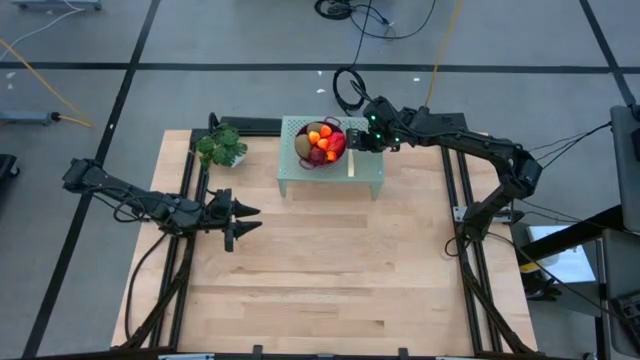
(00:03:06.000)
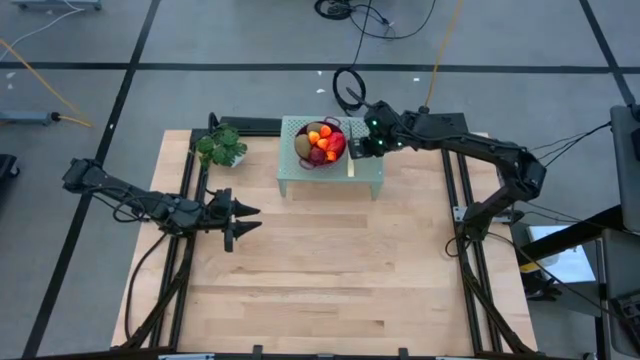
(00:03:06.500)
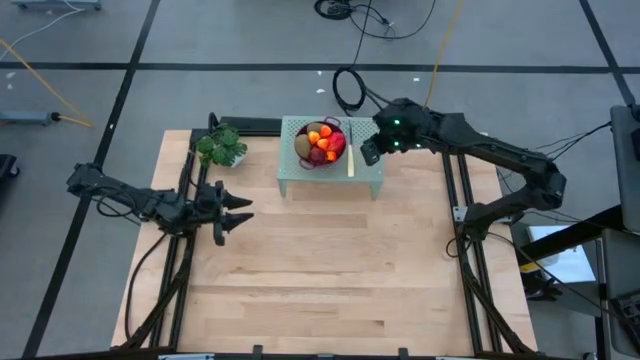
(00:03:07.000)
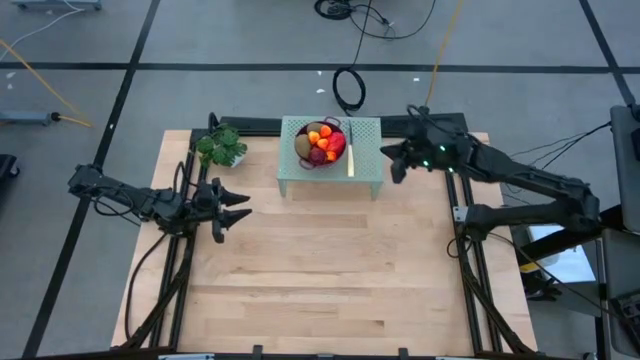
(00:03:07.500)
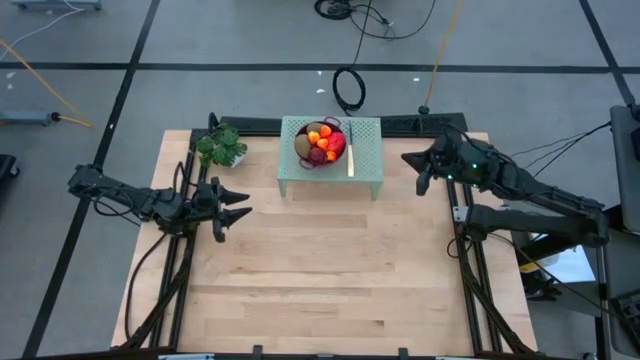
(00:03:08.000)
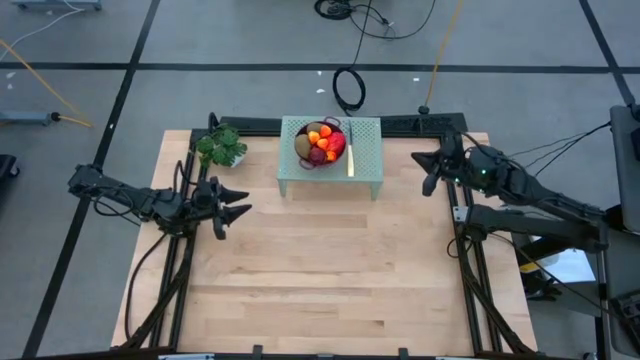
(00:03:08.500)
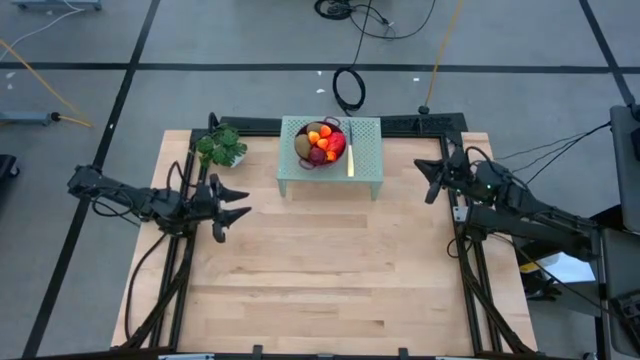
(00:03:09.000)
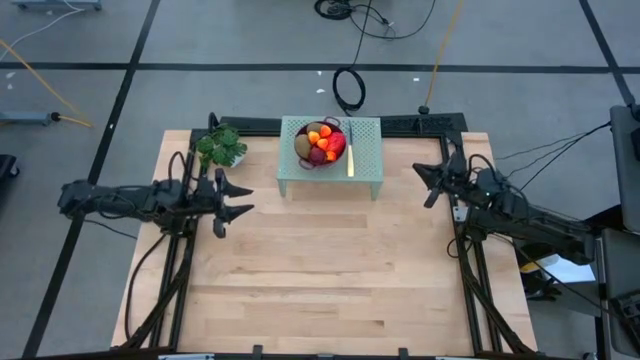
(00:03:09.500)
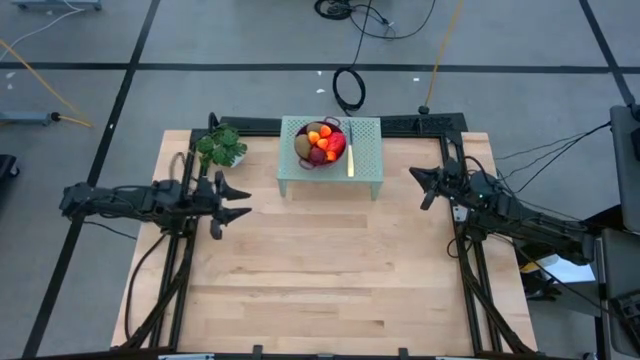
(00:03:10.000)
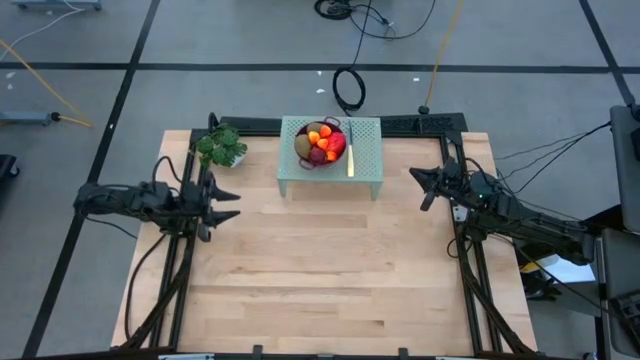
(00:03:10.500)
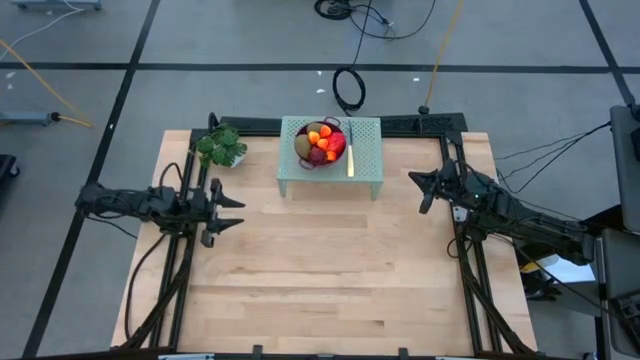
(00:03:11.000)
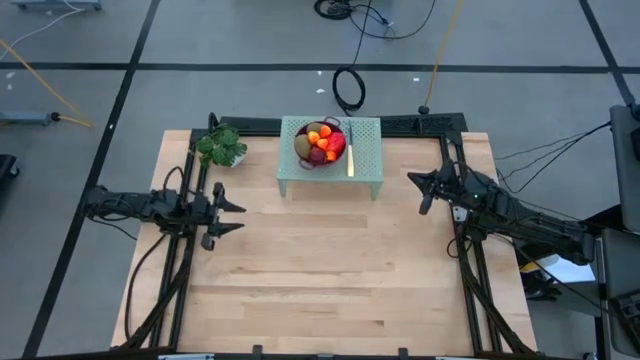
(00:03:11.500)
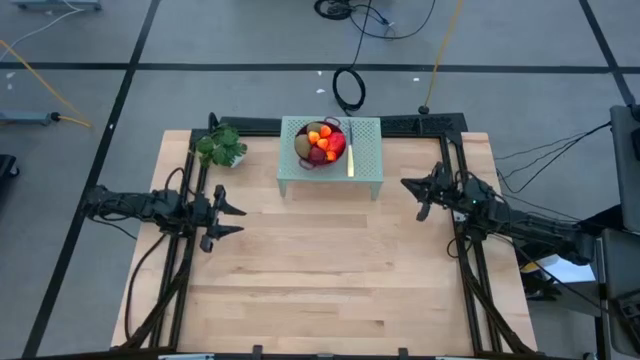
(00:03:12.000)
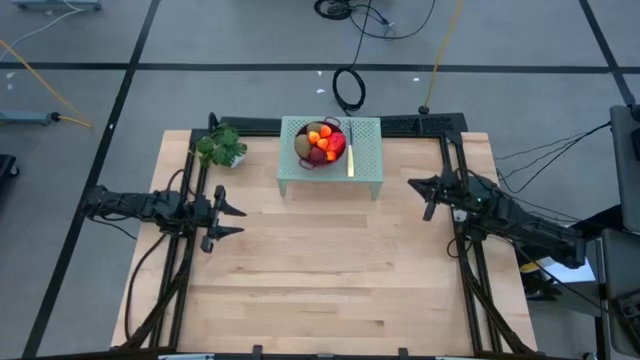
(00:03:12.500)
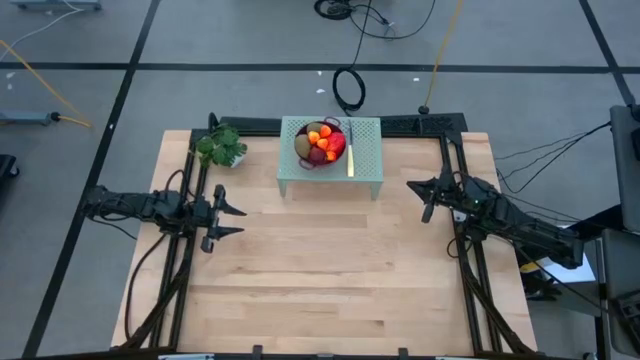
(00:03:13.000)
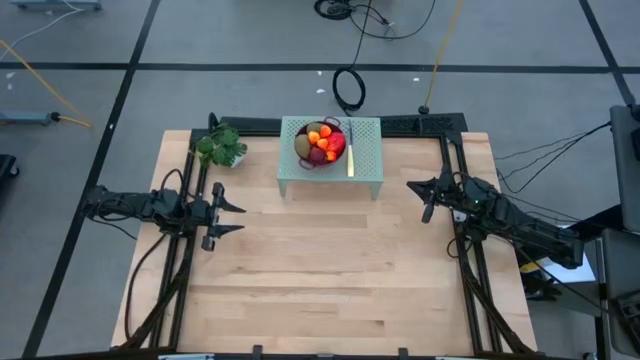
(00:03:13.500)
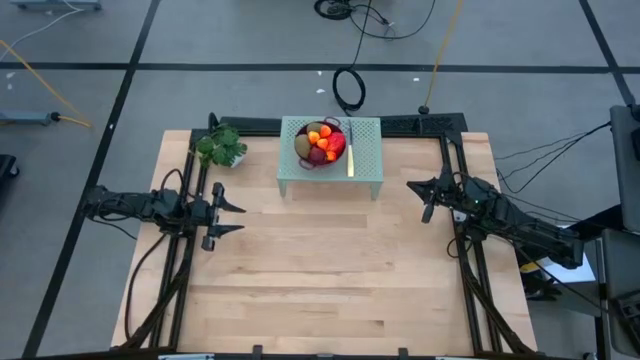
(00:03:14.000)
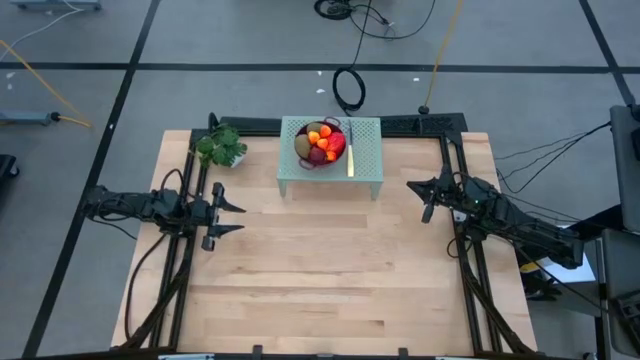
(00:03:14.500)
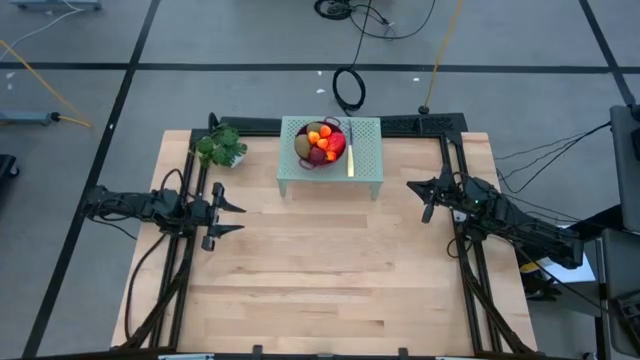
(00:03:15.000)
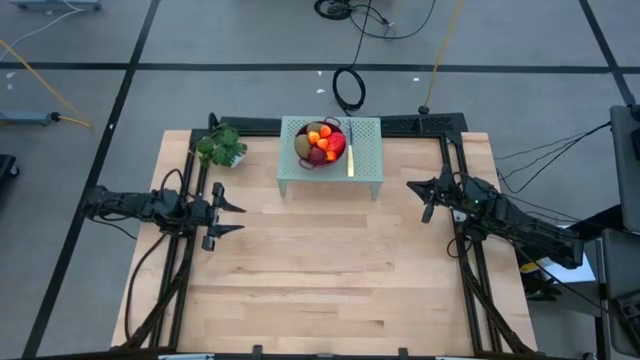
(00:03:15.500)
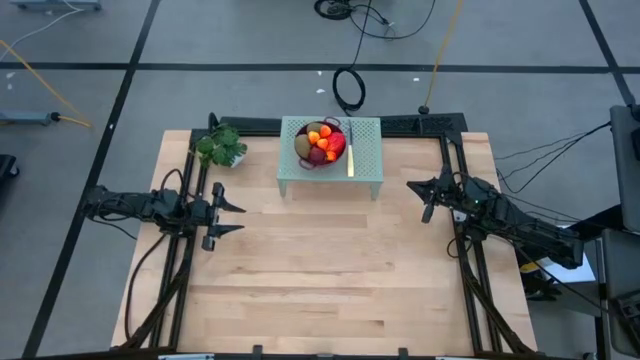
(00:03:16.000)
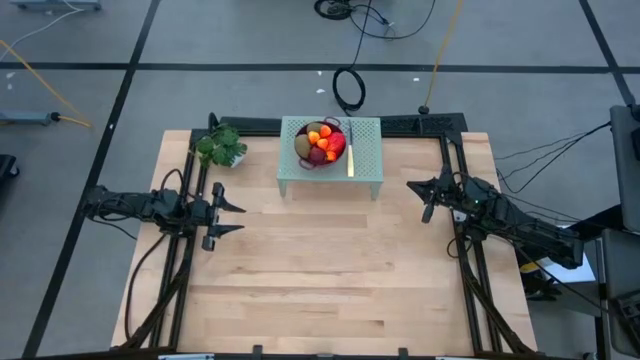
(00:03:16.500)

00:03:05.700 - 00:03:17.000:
Task: Pick & Place Fruit
Return to Home Position

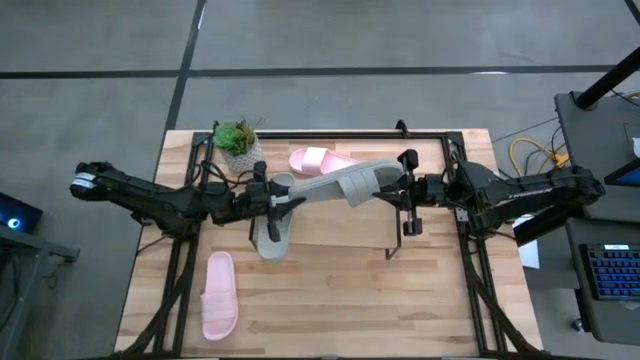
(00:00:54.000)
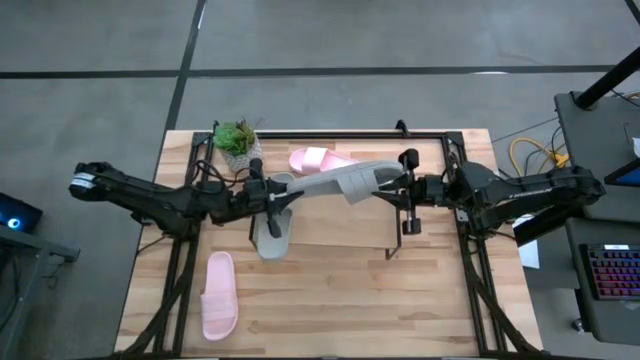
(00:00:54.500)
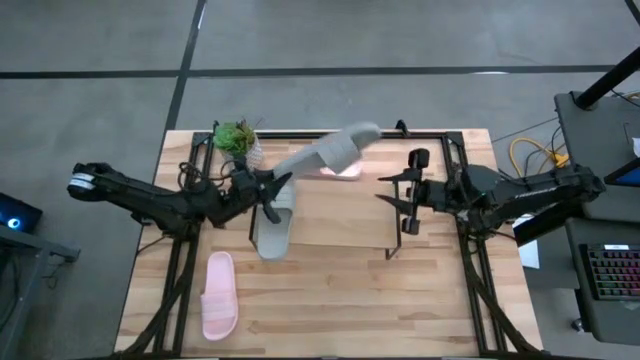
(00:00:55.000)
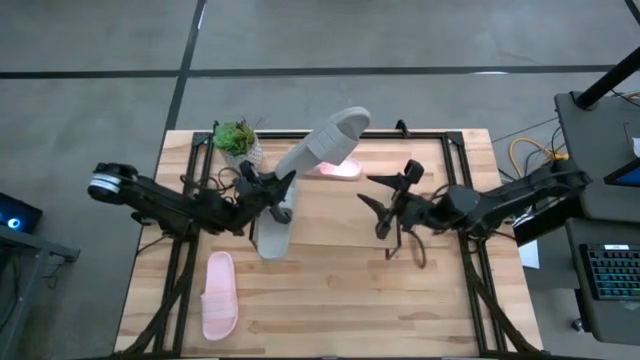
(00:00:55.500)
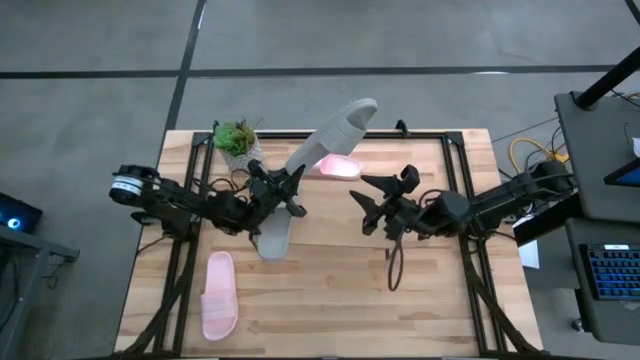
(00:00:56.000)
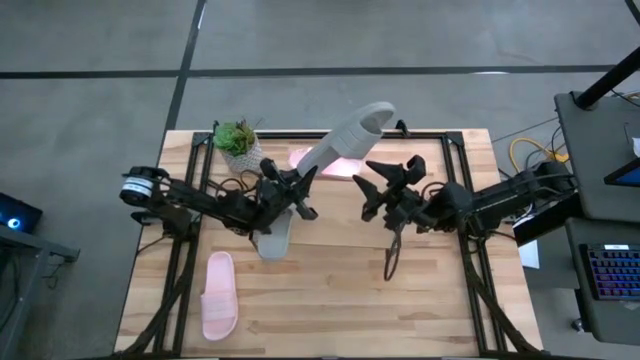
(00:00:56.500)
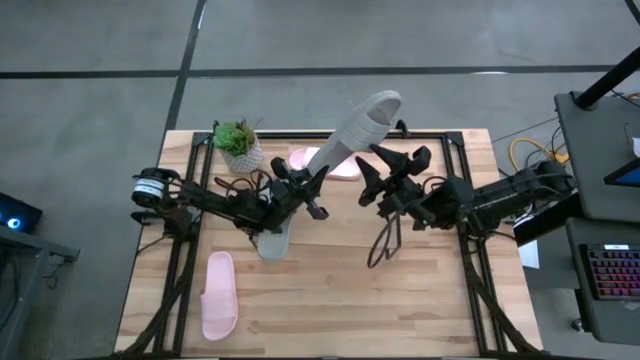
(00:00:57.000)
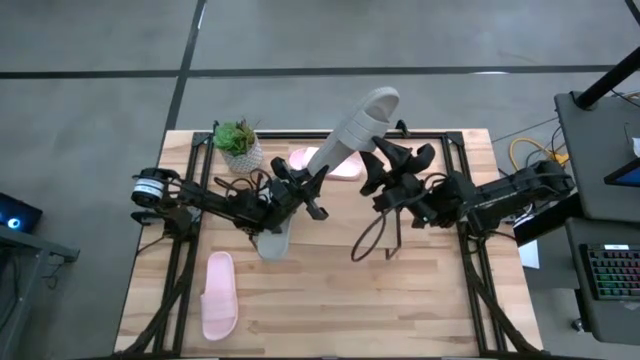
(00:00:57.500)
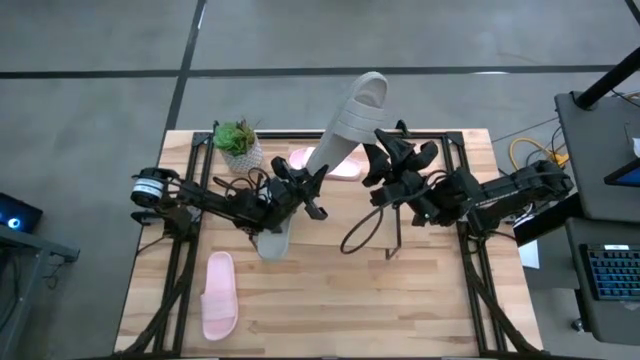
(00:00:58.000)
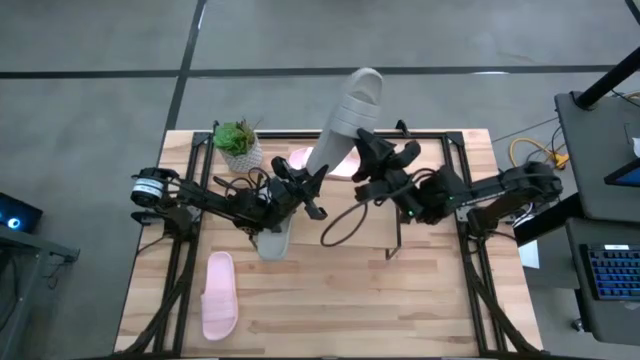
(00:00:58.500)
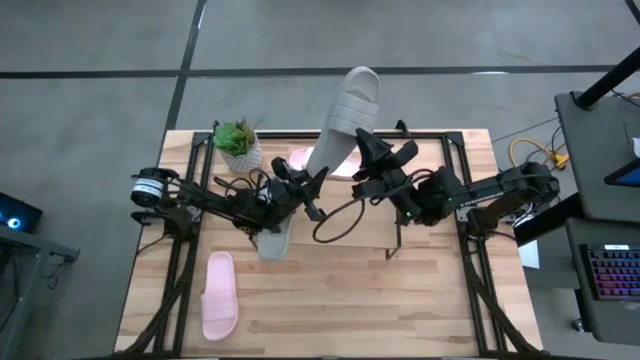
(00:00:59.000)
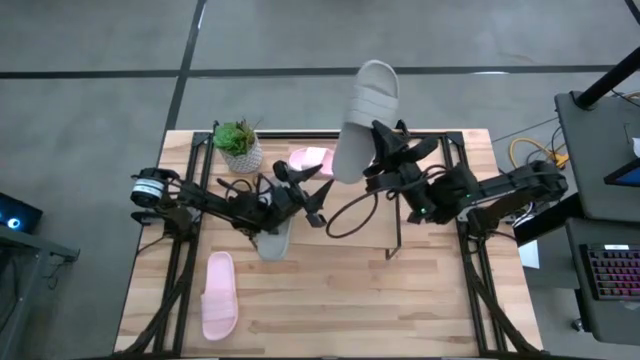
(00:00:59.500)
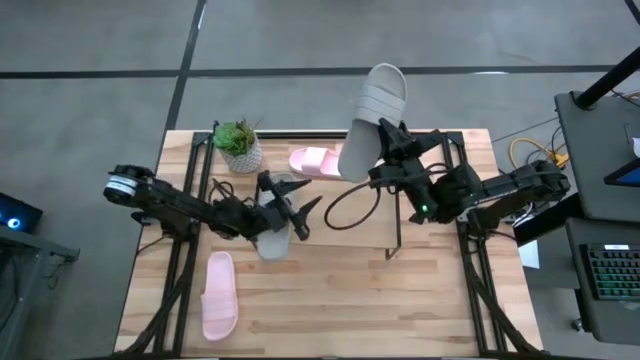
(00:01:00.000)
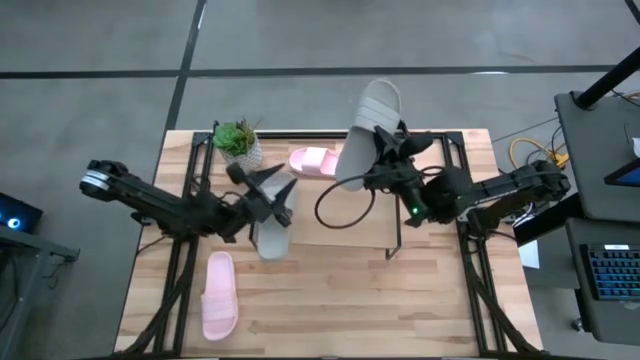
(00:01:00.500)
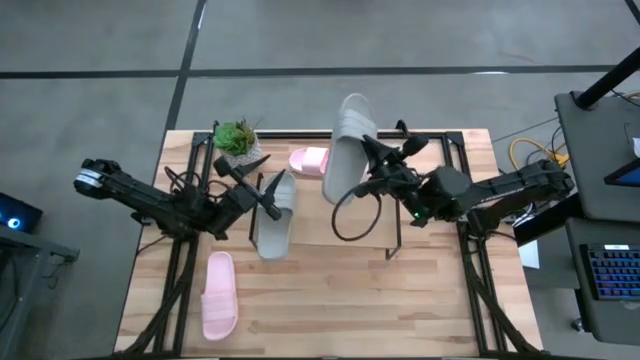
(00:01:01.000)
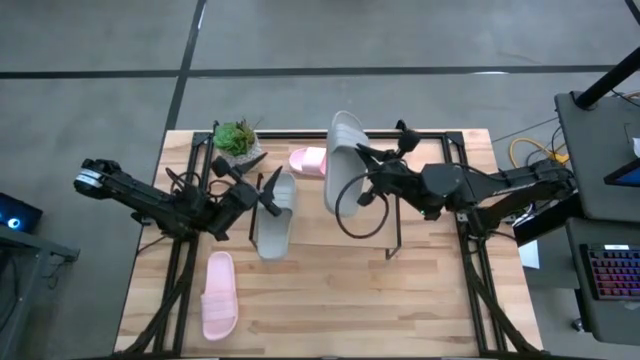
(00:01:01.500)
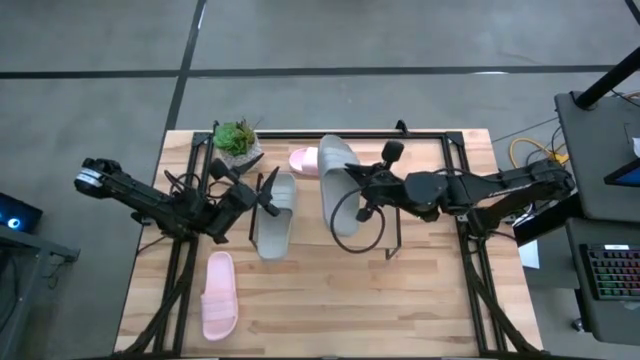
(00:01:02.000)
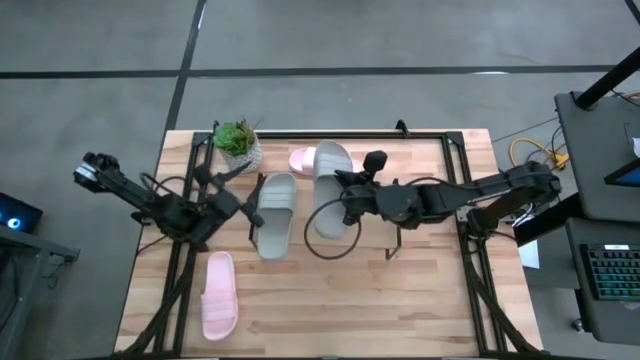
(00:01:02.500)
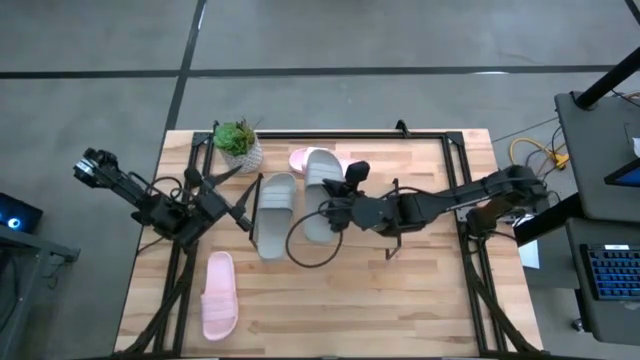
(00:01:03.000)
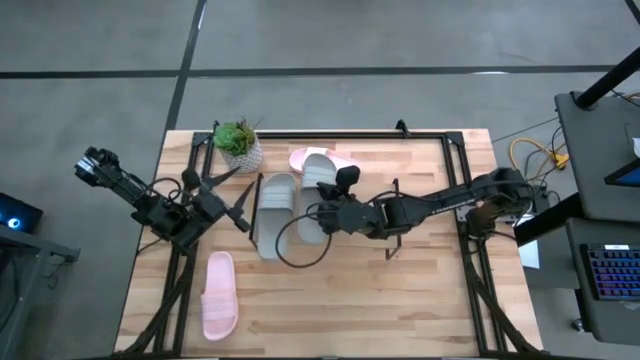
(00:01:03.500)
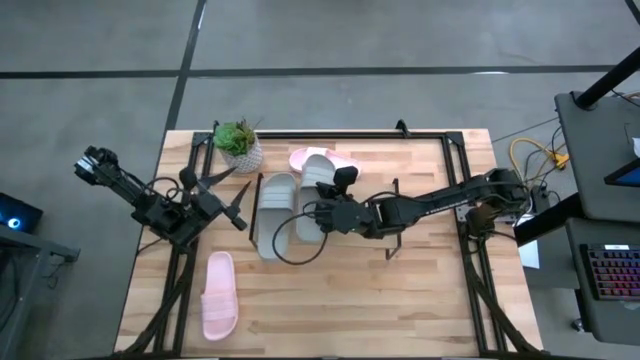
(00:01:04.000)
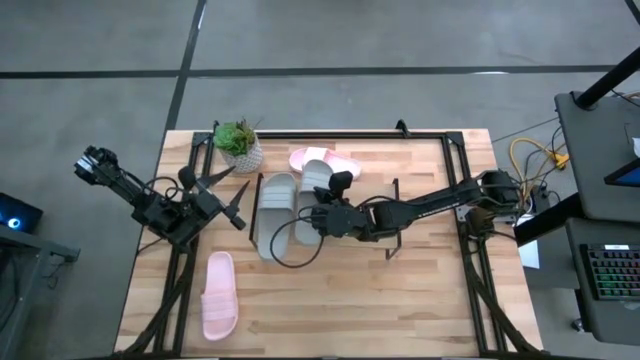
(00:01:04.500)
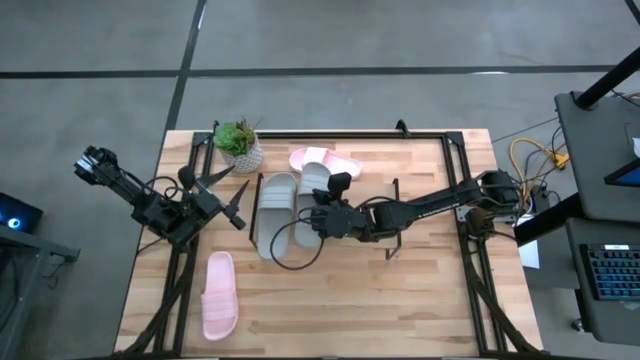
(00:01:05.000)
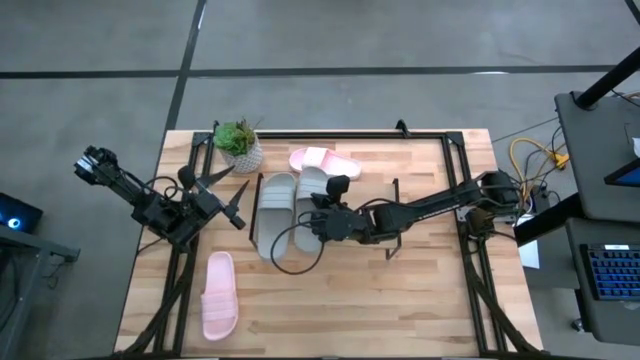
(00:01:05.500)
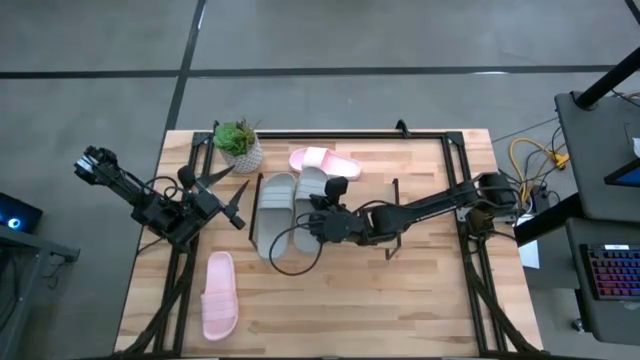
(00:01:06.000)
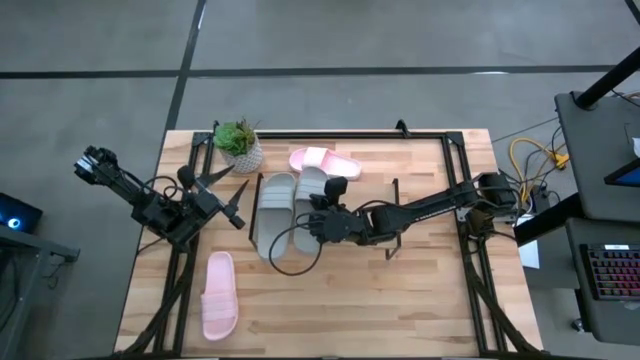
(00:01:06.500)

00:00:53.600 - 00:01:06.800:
Task: Pick and place slides into the shelf
Put the gray slide on the shelf
